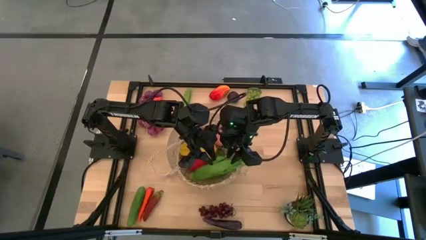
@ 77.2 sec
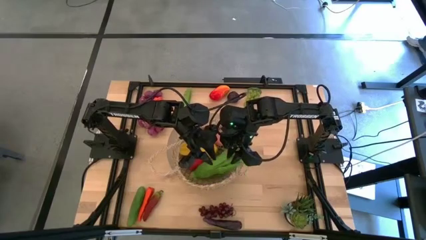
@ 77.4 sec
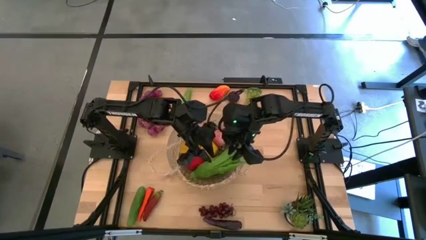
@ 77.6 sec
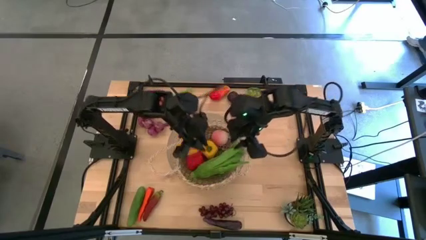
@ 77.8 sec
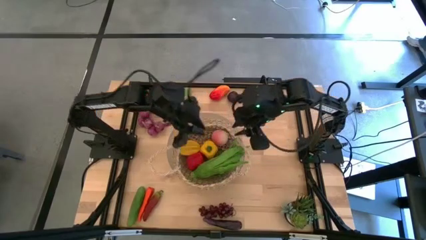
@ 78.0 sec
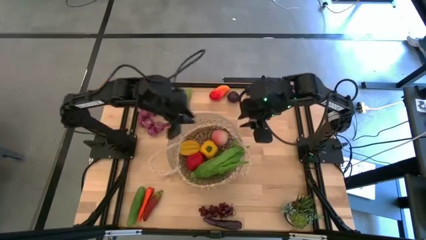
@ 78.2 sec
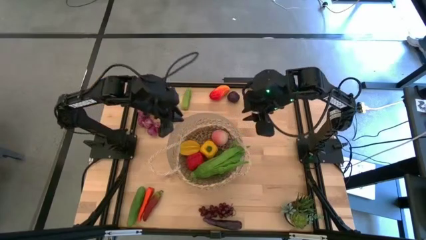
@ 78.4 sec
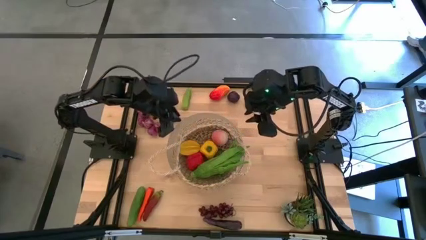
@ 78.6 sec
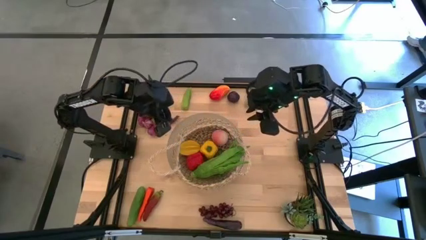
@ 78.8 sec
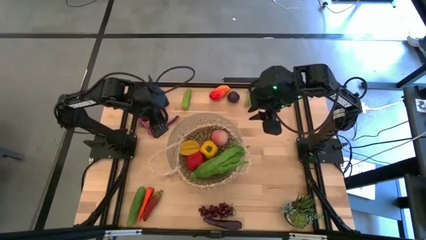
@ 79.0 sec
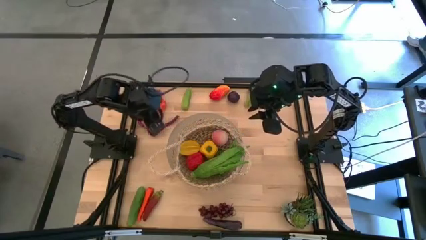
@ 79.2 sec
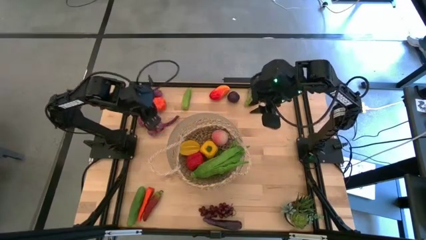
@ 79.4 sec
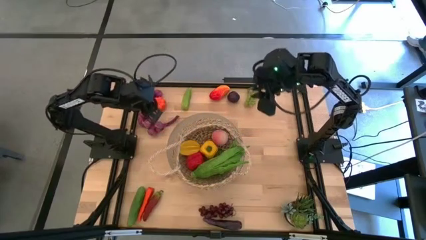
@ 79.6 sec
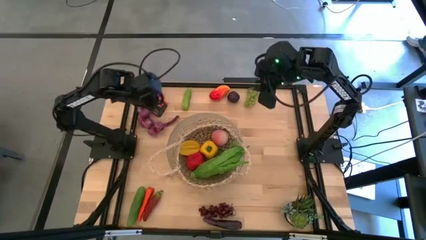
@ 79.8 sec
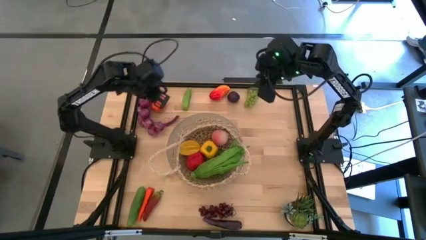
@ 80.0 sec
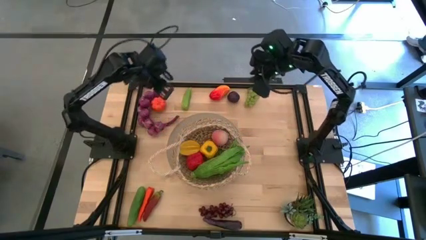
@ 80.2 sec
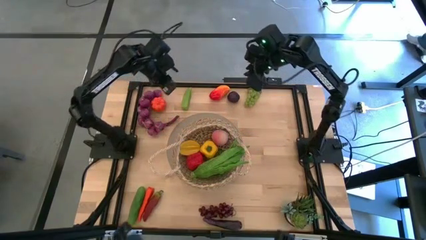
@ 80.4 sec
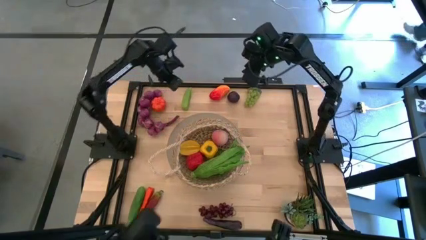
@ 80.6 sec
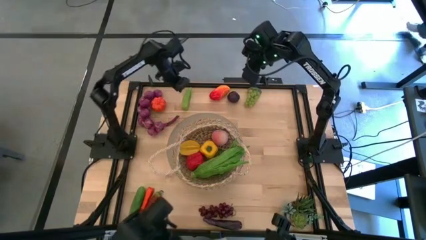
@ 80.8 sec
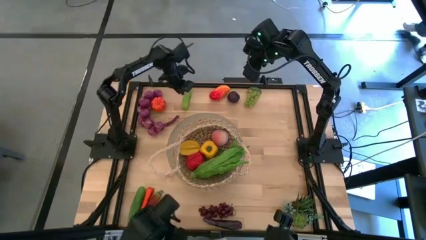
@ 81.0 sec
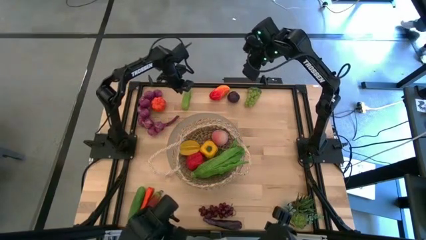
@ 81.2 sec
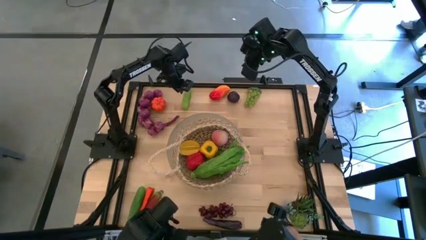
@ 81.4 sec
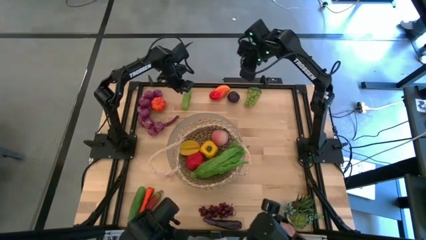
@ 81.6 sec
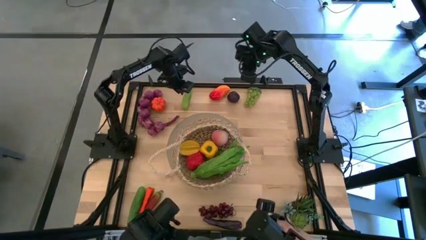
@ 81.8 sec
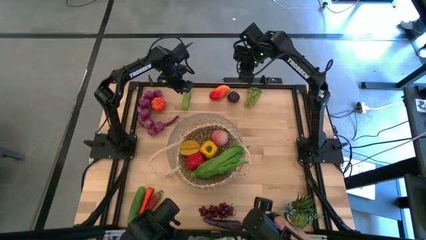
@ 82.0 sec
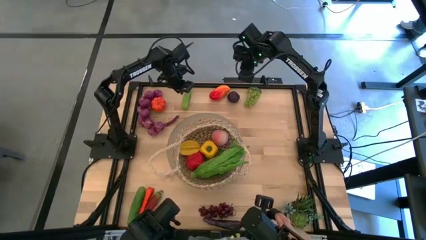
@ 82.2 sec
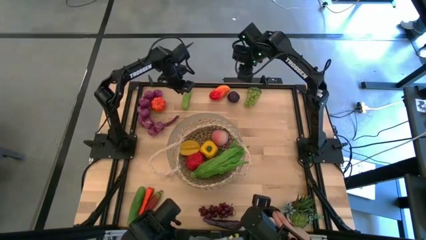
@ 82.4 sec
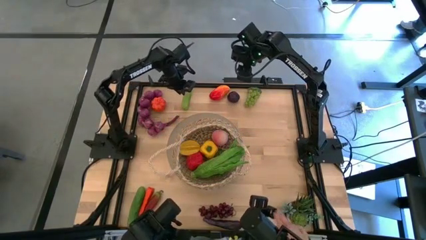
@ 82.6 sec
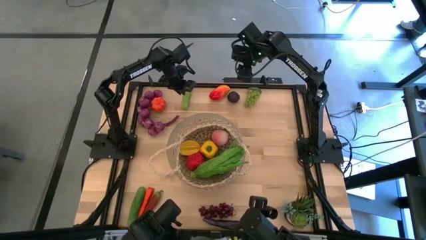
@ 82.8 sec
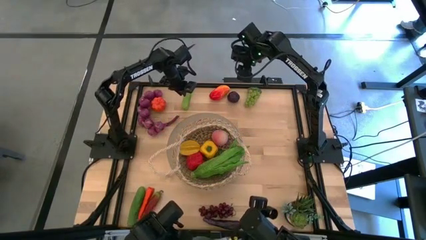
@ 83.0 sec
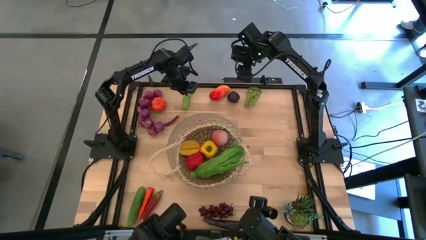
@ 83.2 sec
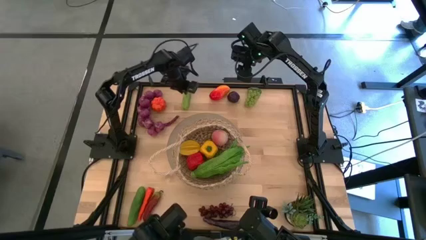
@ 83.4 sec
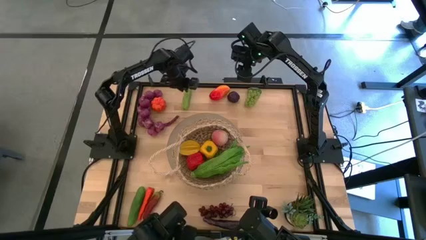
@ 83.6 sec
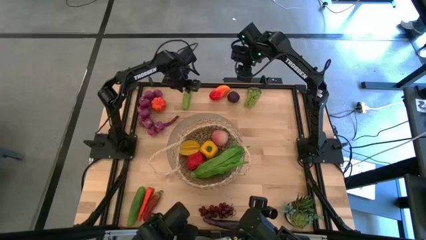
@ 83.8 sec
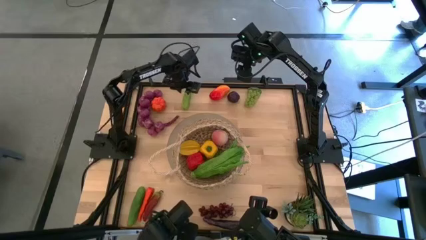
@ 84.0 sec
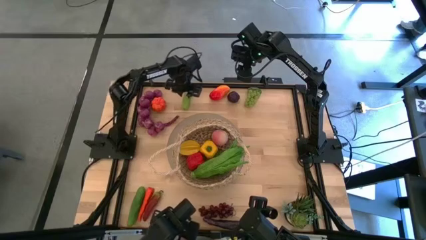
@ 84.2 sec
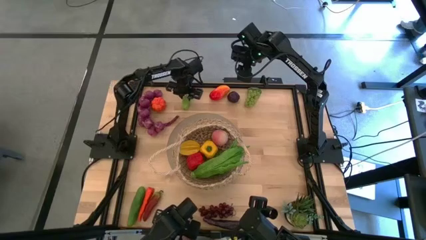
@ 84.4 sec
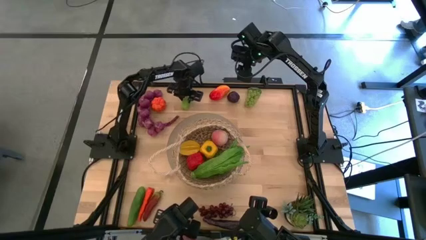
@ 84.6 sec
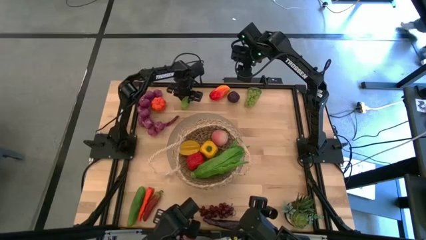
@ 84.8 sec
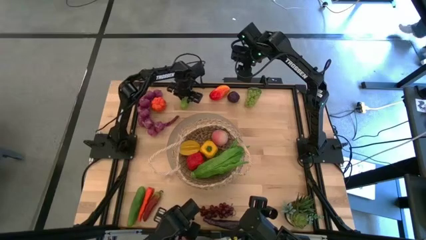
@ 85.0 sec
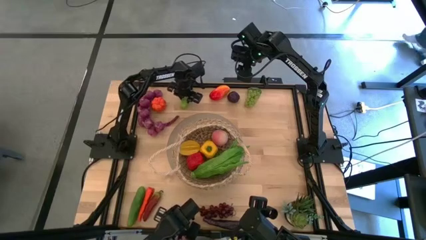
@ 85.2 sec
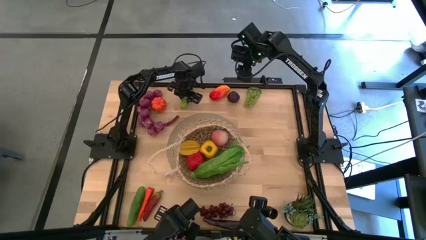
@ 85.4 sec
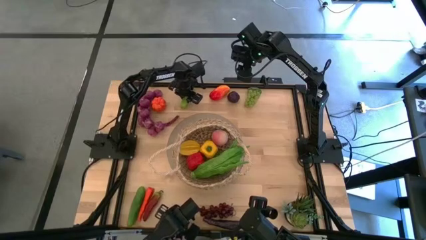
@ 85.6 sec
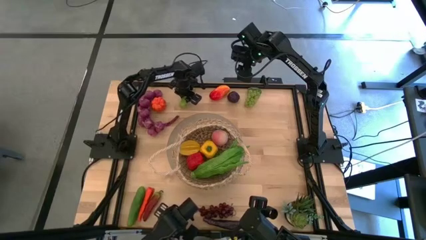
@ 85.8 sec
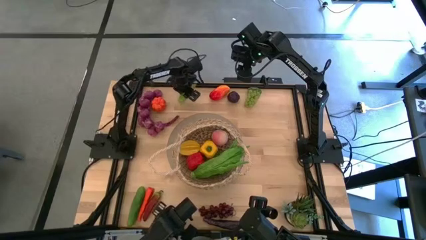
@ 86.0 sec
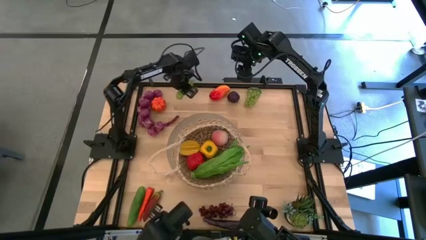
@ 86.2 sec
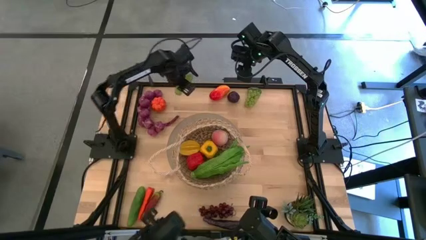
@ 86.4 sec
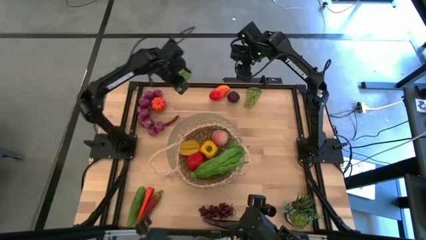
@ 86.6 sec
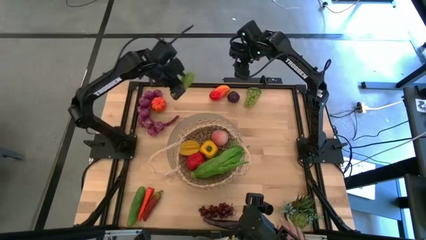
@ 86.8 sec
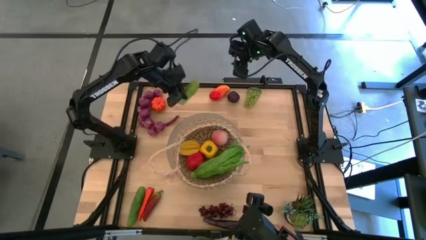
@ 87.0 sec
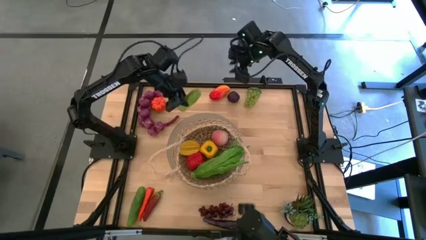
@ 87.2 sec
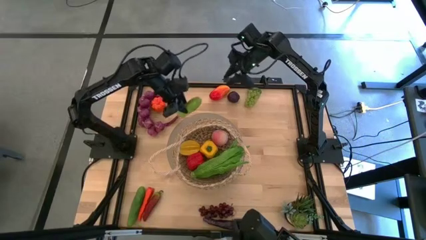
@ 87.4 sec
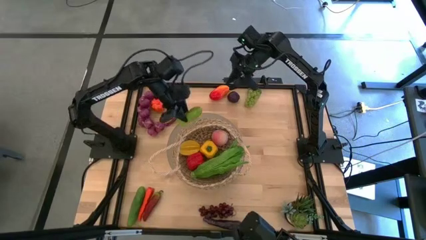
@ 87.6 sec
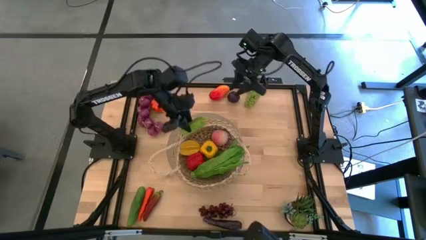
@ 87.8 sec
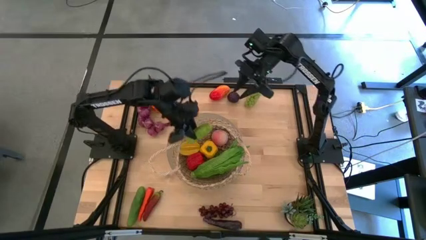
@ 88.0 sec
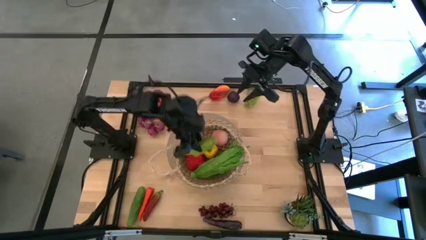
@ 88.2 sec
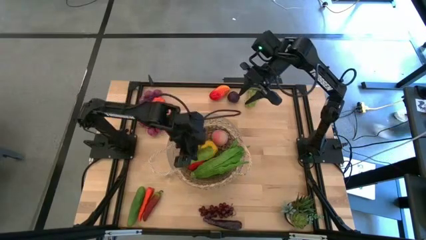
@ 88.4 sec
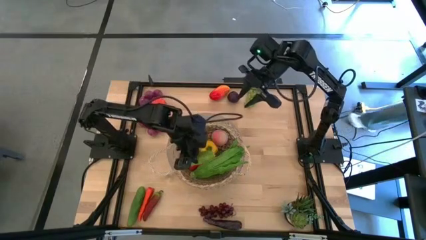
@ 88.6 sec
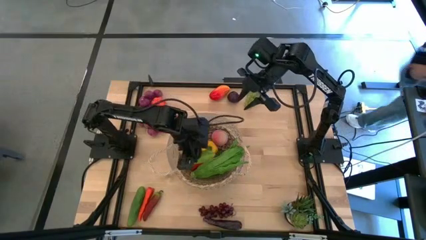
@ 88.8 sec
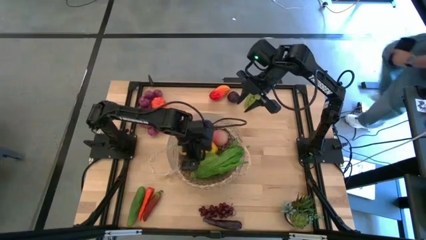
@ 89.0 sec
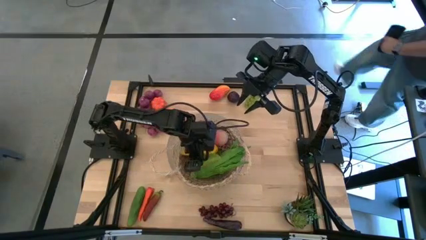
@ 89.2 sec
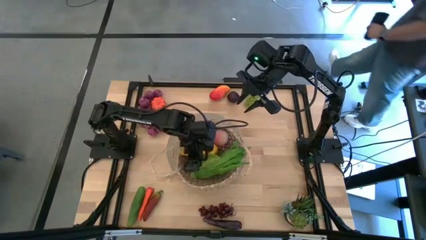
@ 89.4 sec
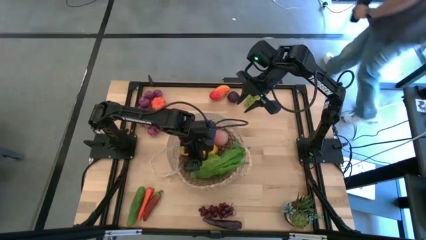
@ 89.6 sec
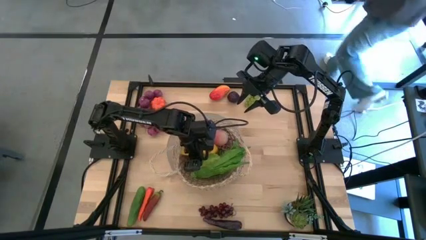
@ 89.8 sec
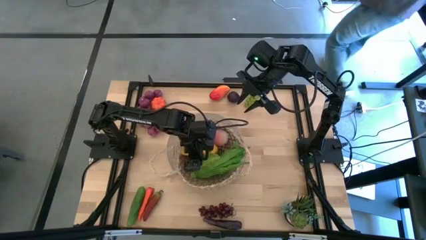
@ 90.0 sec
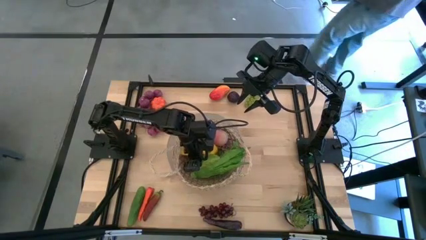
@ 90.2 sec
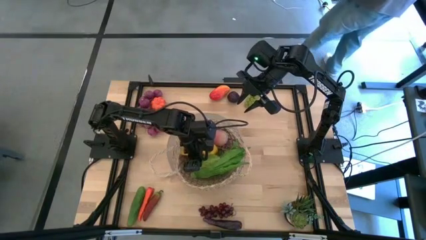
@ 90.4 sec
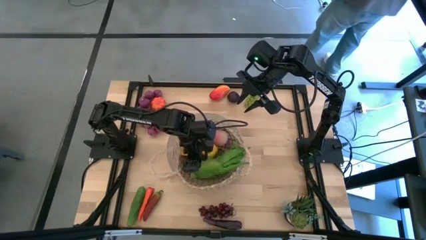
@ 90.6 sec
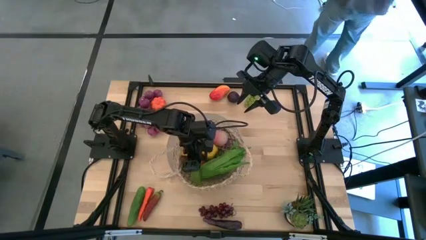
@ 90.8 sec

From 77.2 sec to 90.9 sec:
Task: Build produce basket
Put the top green cucumber into the brown basket
